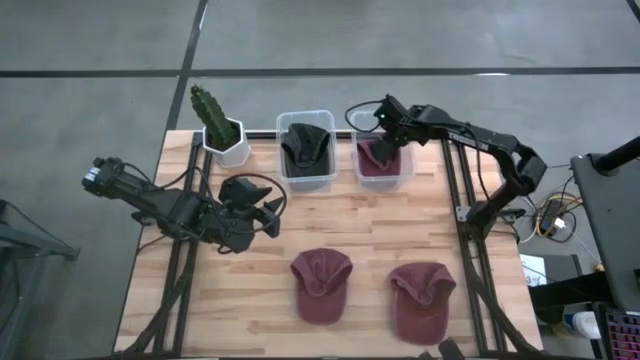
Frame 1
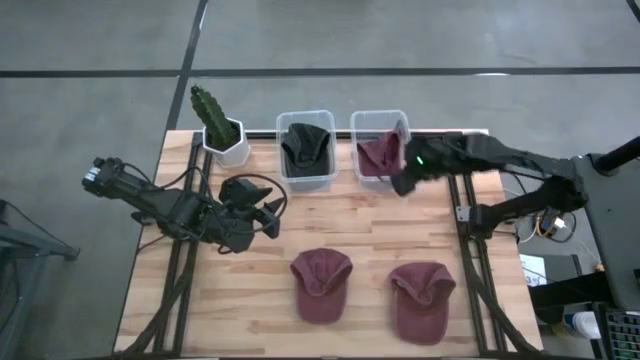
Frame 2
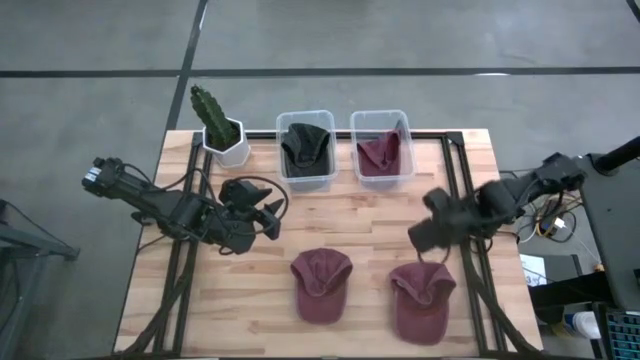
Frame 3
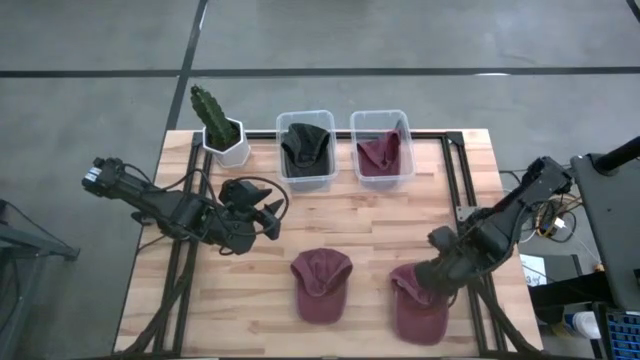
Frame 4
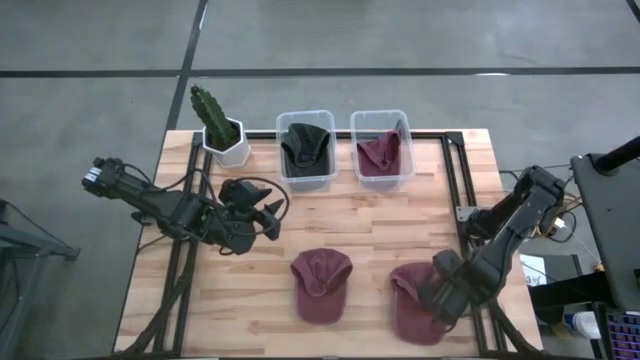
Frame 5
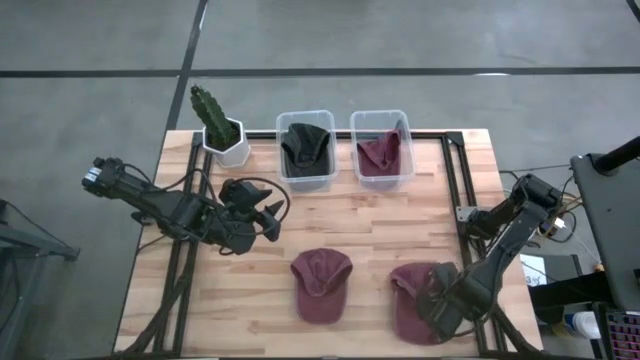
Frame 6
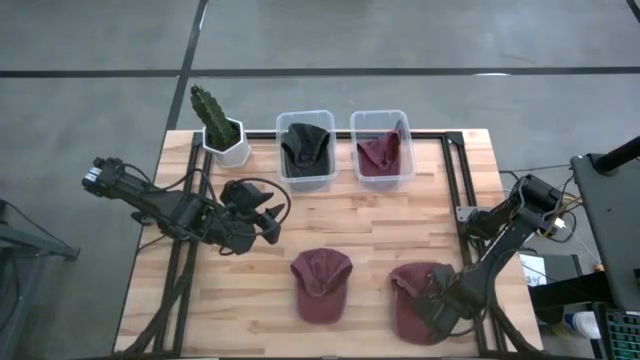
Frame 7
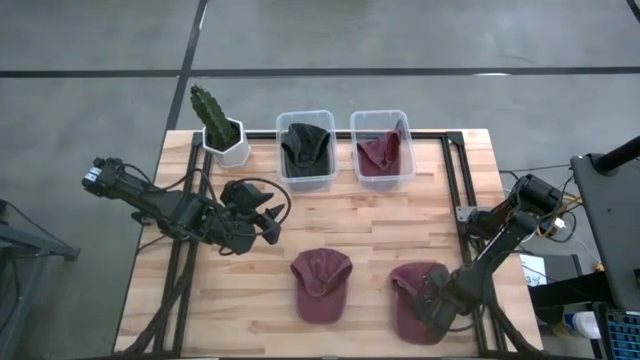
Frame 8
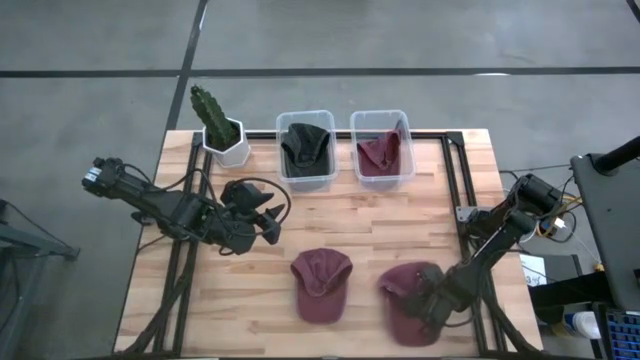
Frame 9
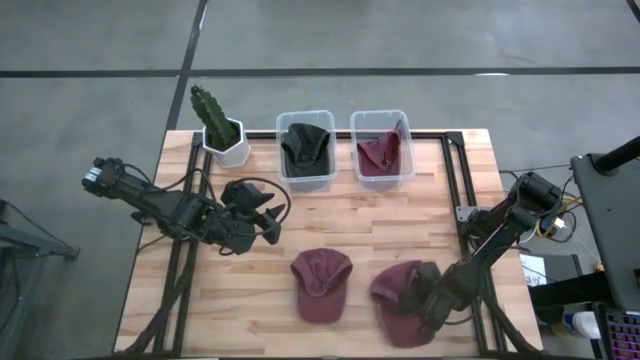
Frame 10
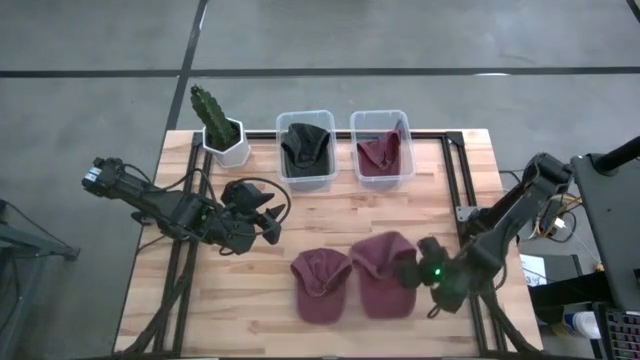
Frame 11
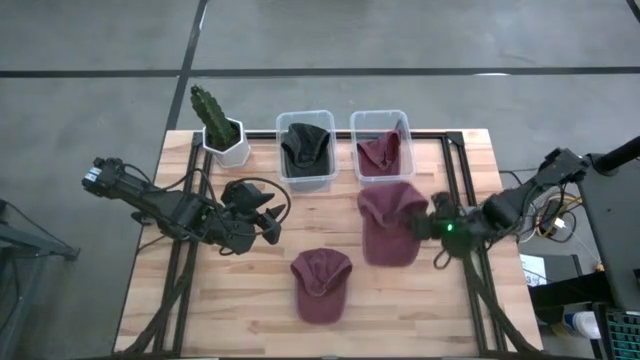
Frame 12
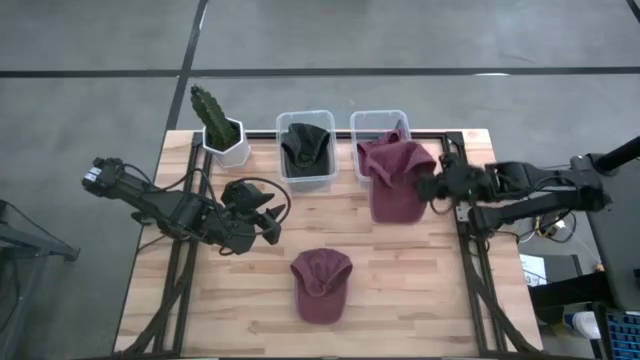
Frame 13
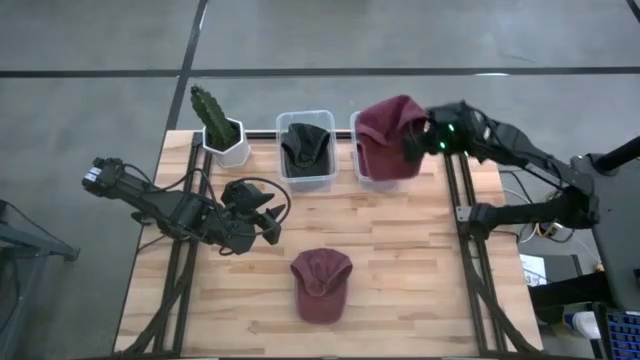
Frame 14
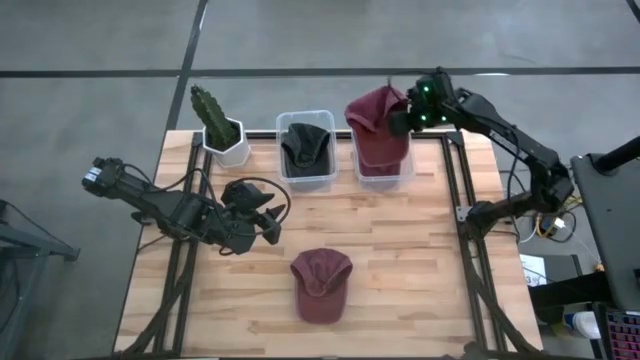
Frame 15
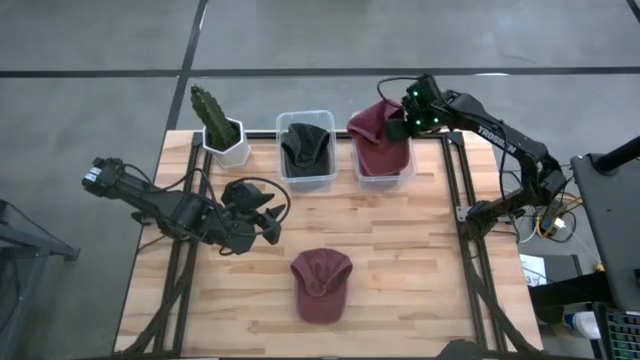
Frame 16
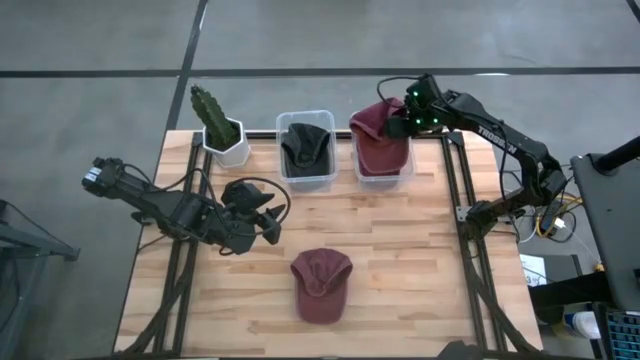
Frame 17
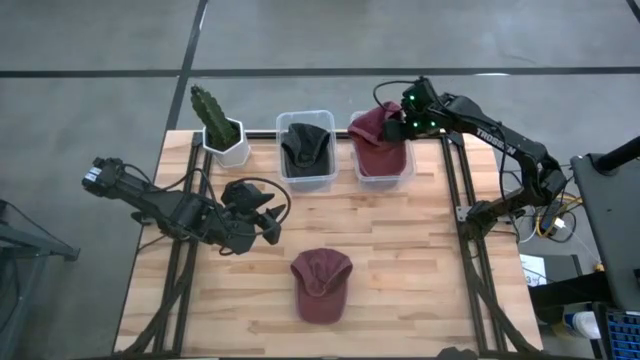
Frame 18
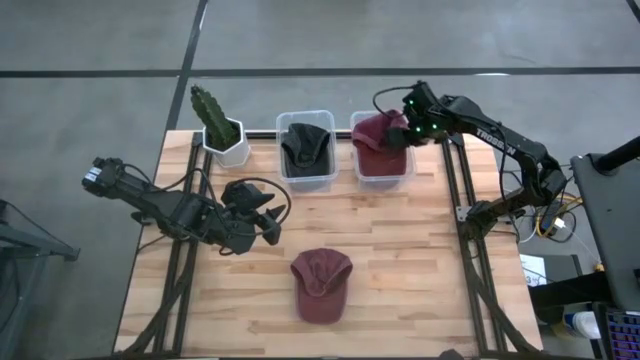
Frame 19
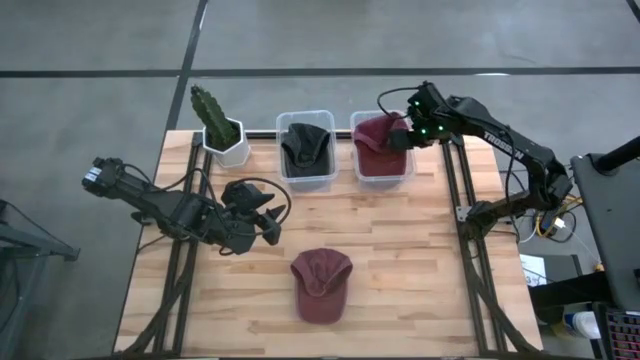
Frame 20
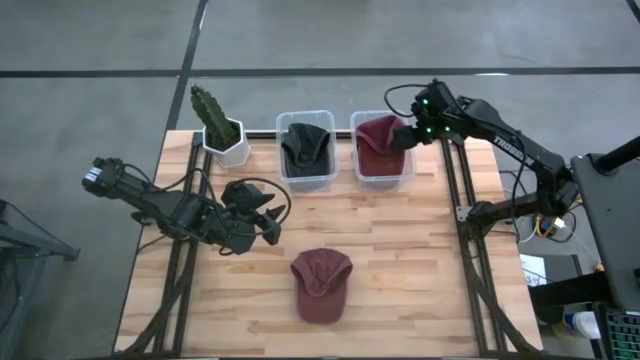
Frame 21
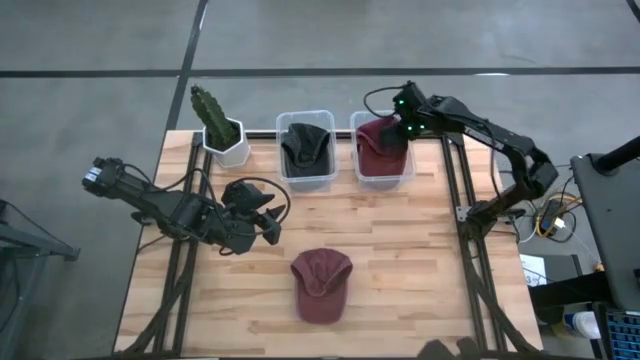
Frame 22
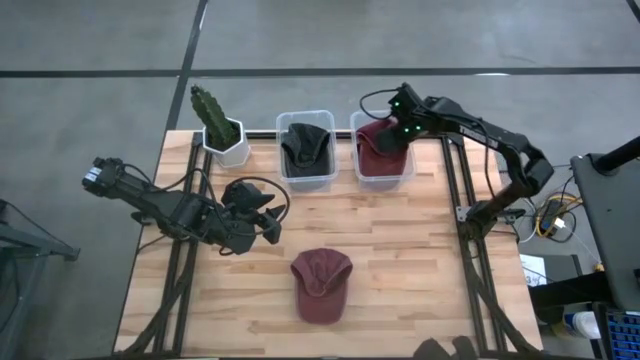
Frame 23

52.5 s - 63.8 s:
Task: Pick & Place hat
Put the right red cap into the right transparent bin

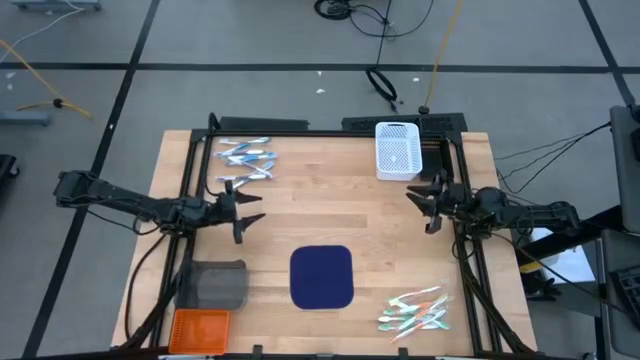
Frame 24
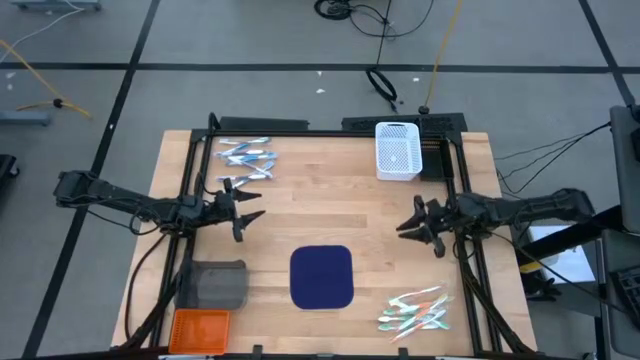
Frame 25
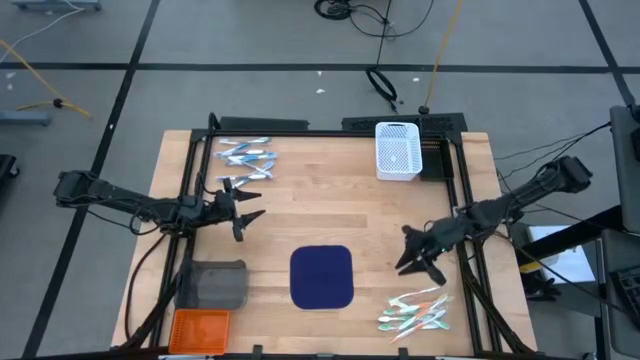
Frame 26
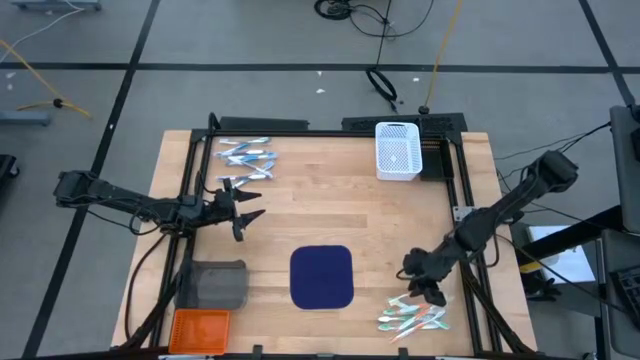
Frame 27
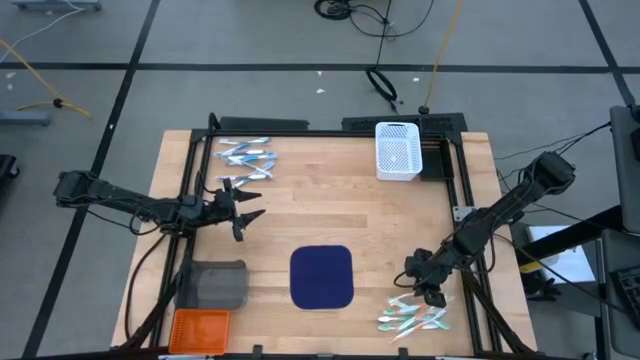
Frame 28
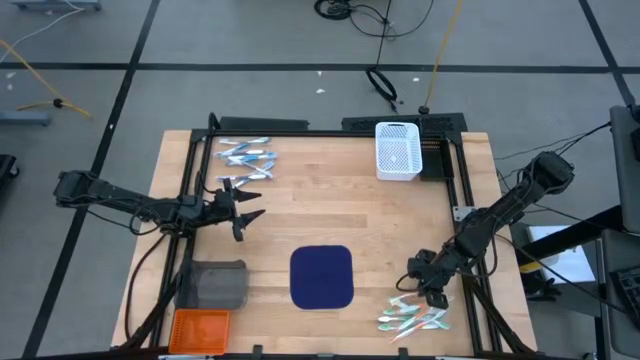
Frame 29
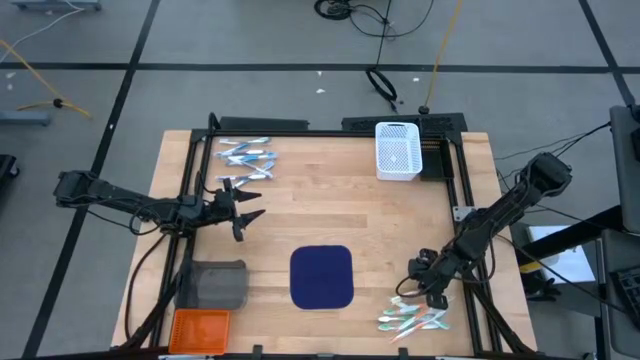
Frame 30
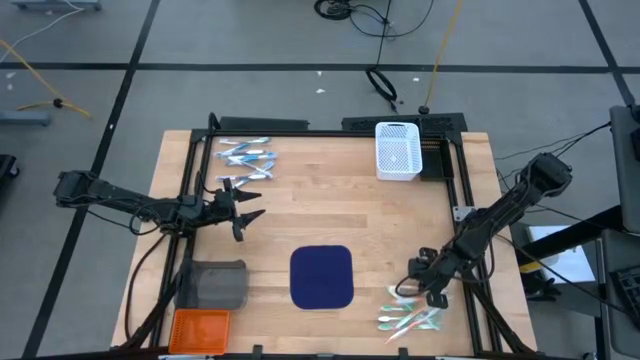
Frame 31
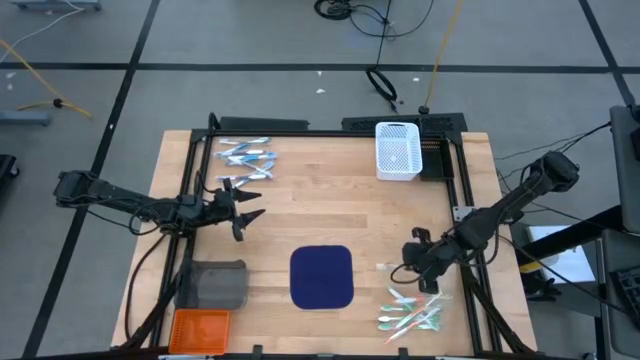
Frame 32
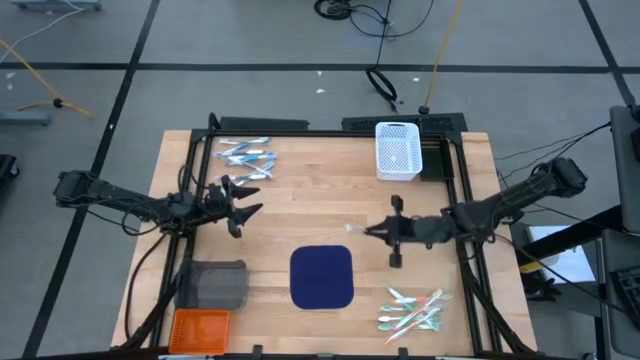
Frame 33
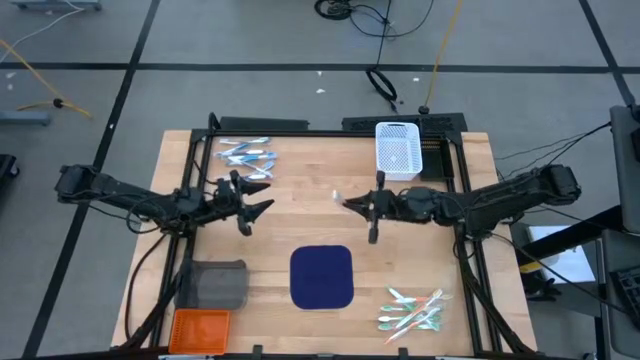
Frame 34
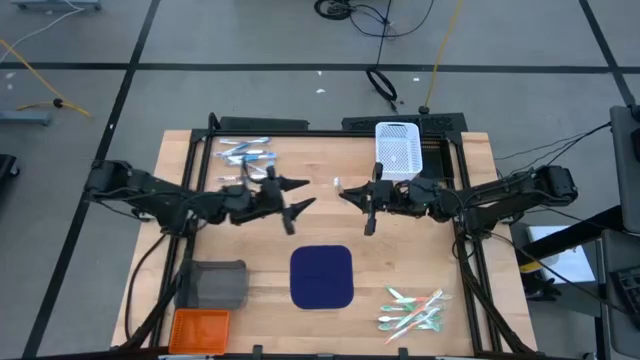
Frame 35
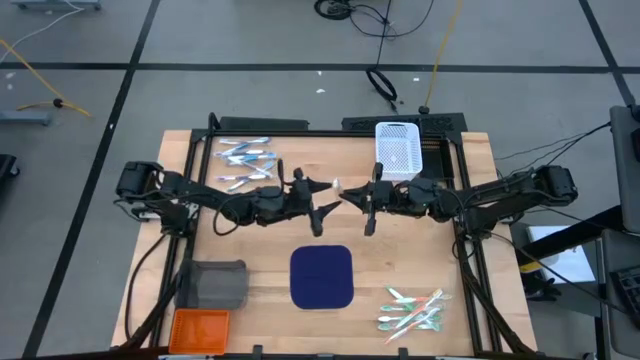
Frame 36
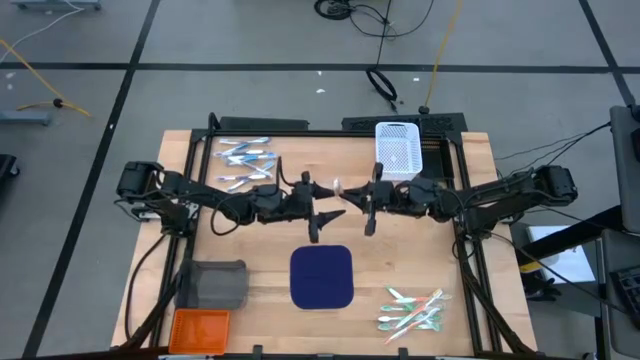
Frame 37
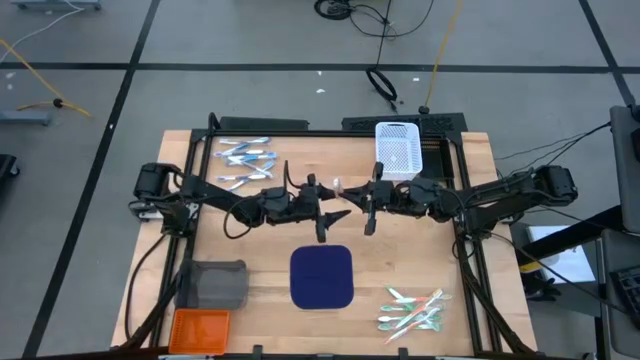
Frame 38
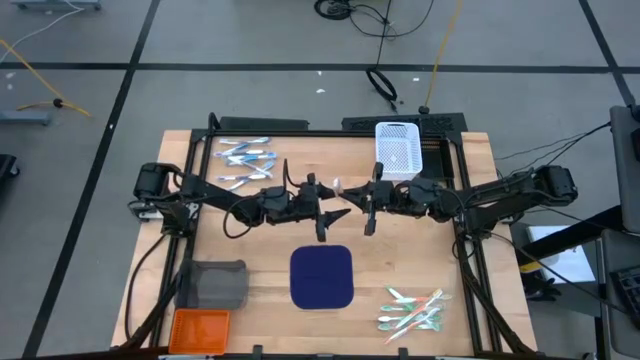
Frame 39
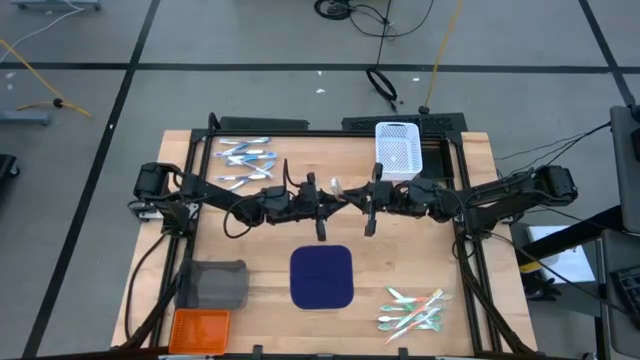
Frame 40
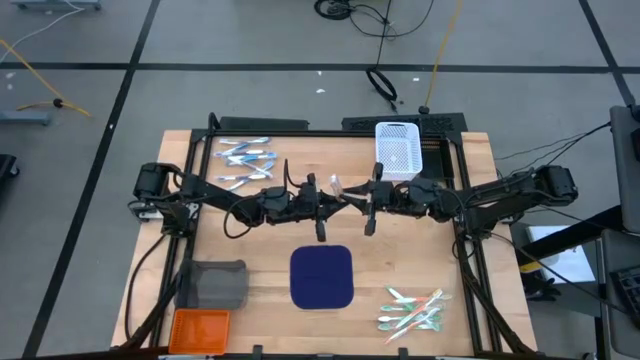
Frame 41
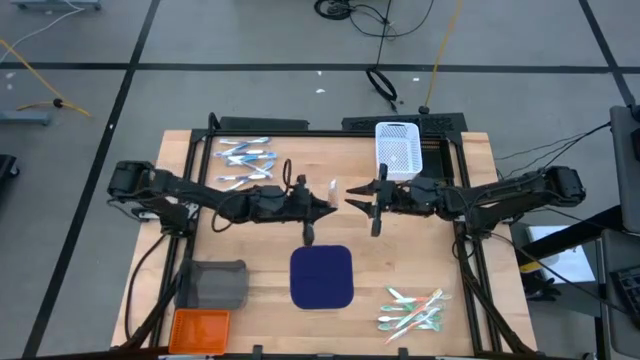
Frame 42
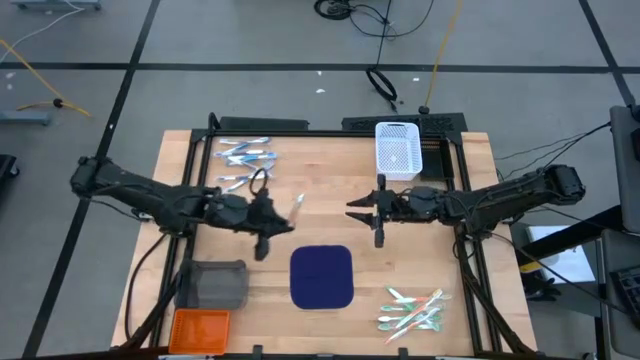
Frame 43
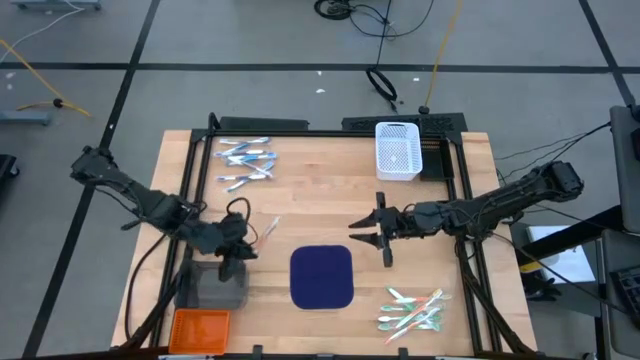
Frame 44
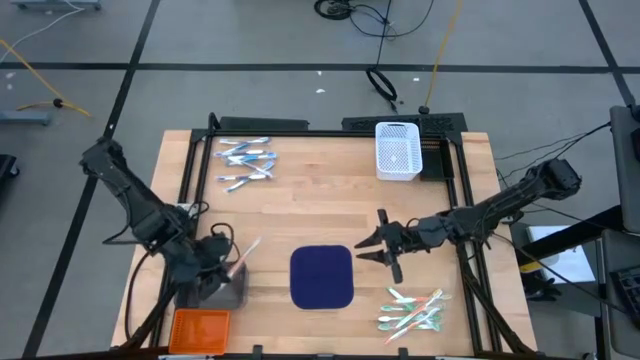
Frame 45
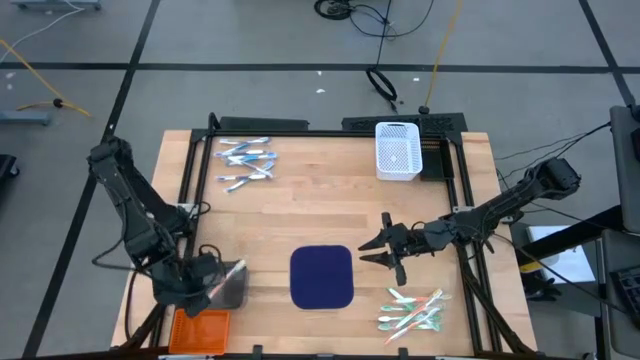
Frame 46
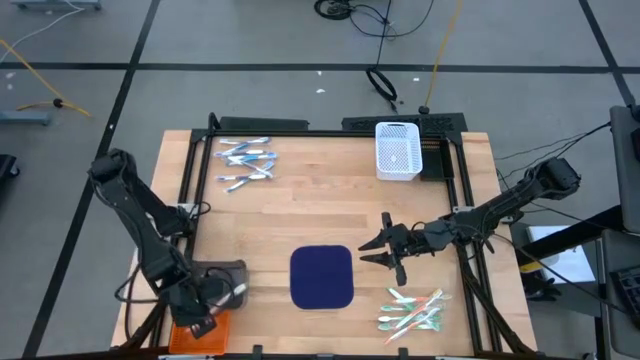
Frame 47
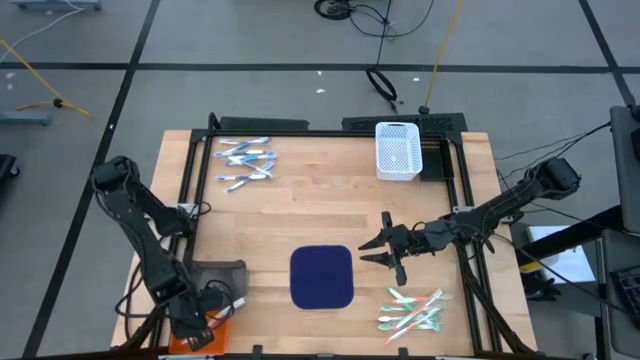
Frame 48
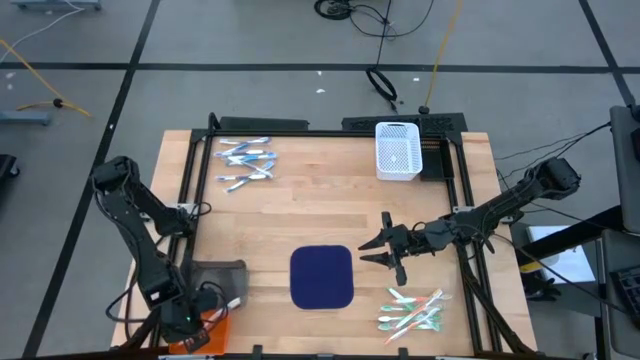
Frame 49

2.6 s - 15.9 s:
Task: Pick & Place Toothbrushes
Put the orange toothbrush into the orange basket
